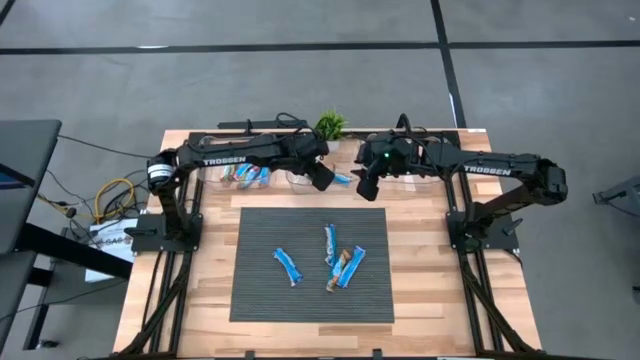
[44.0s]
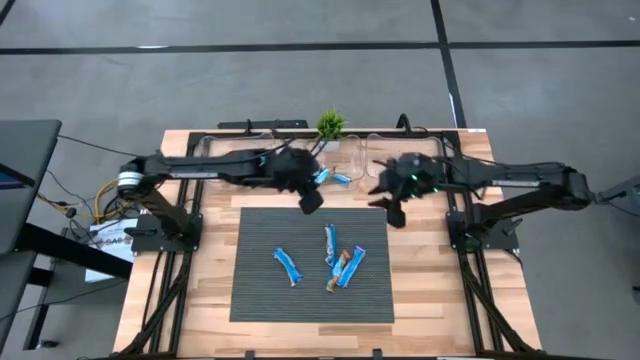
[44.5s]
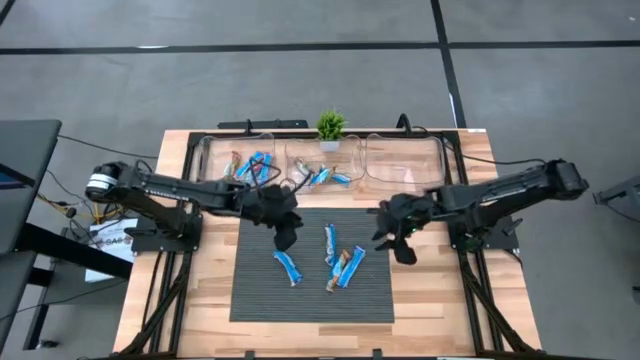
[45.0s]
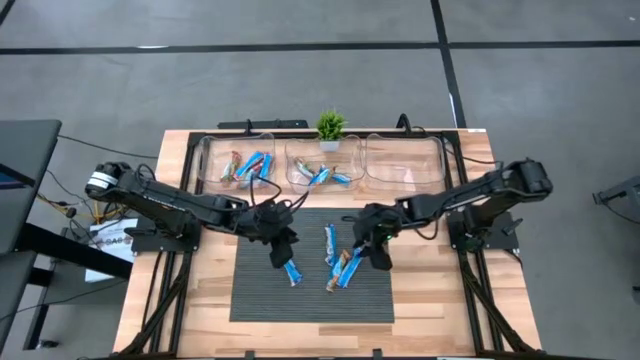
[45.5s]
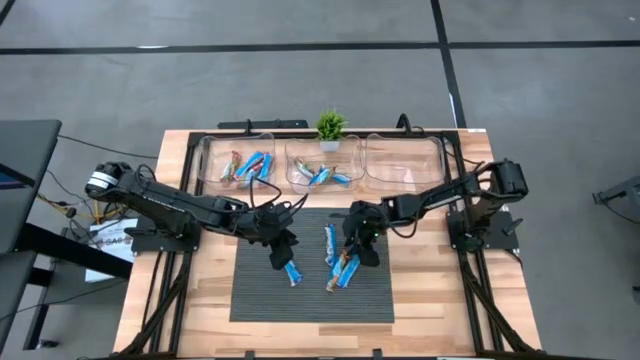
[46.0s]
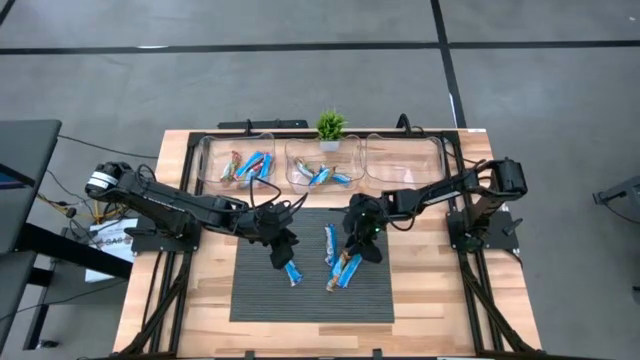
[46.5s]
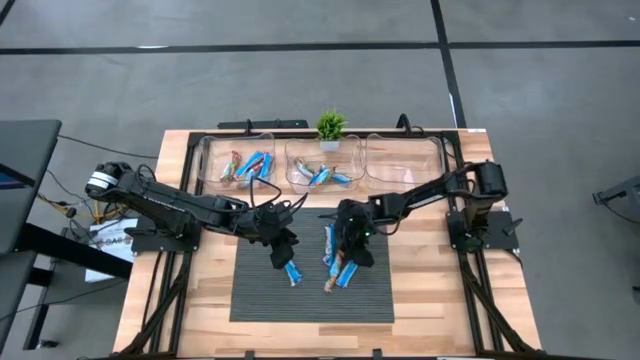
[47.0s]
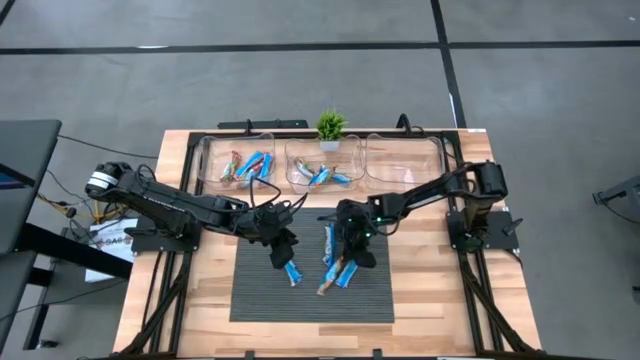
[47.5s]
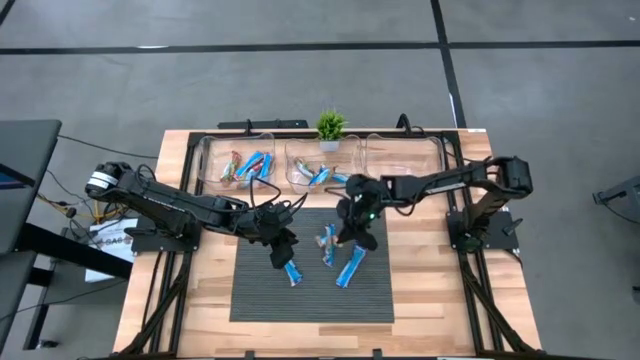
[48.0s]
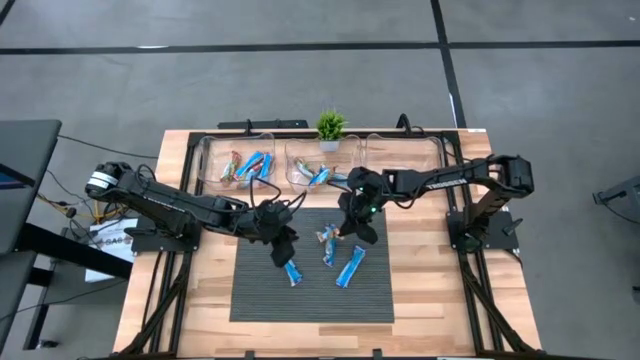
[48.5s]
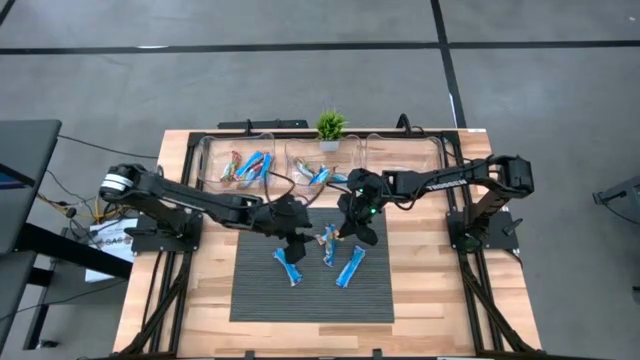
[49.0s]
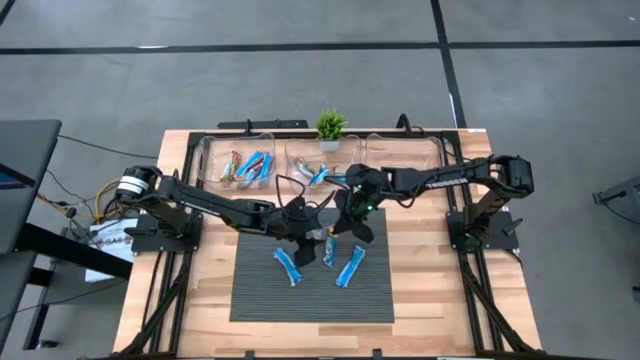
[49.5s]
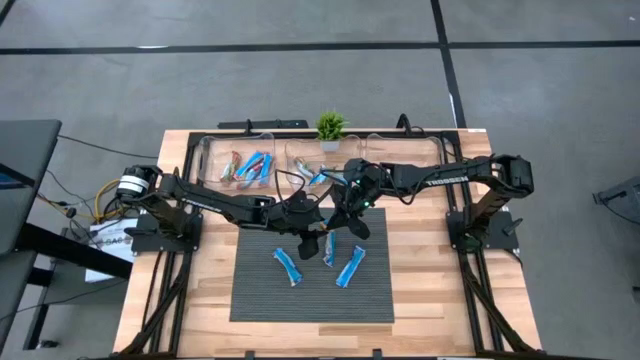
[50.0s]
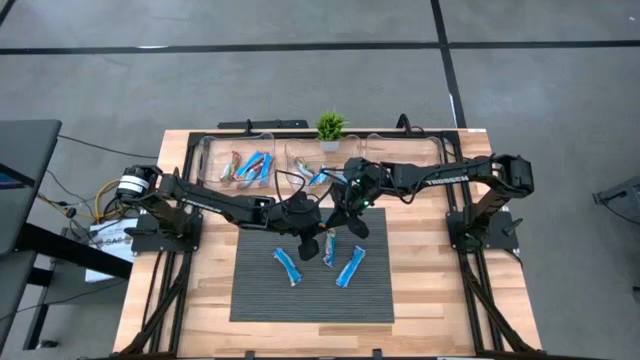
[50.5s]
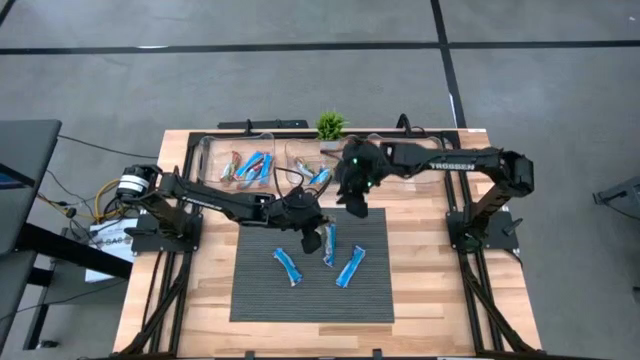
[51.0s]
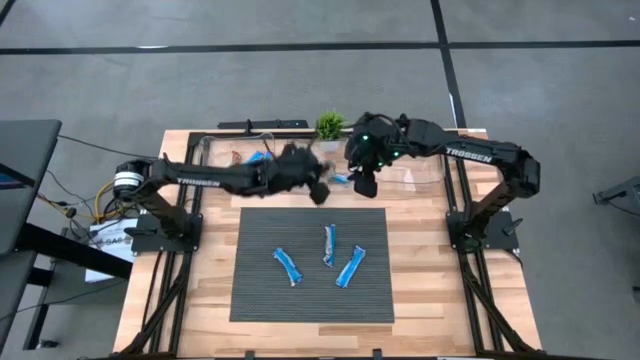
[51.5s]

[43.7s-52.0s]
Task: Pick and place Granola Bars by type
Put the green granola bar into the top center transparent bin

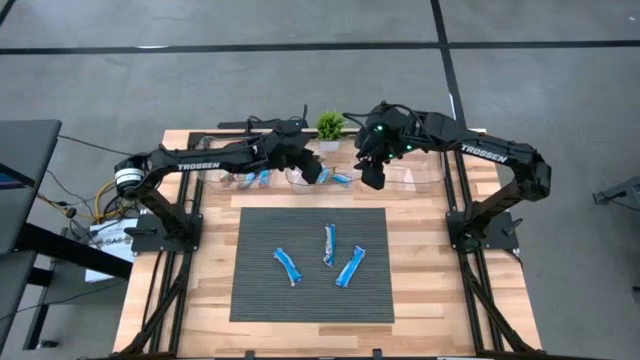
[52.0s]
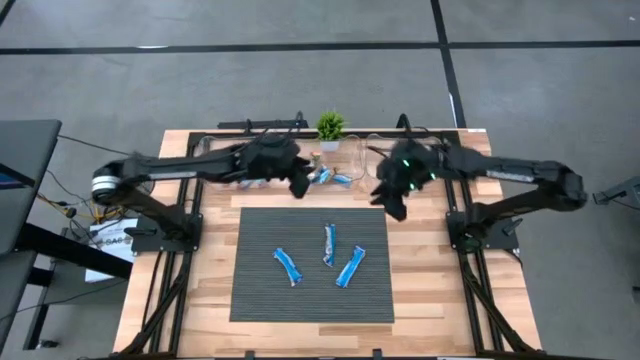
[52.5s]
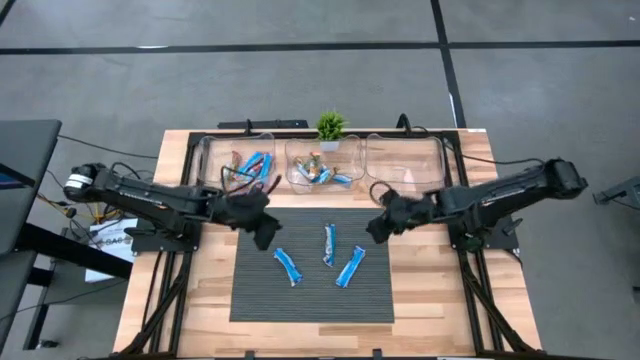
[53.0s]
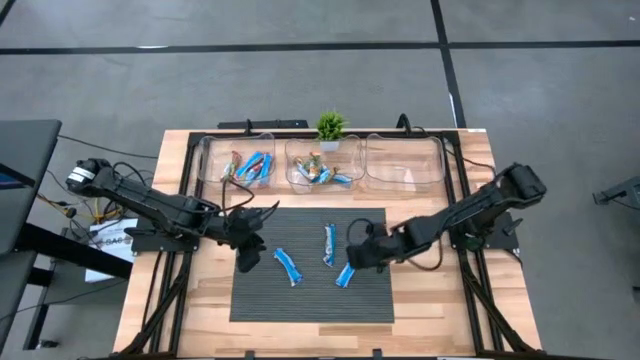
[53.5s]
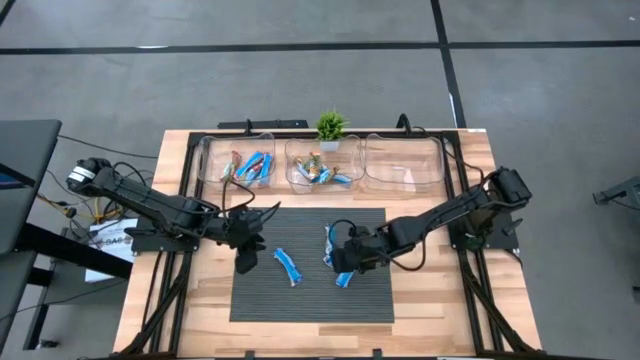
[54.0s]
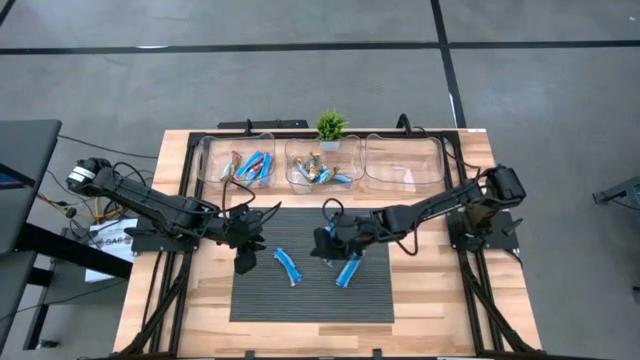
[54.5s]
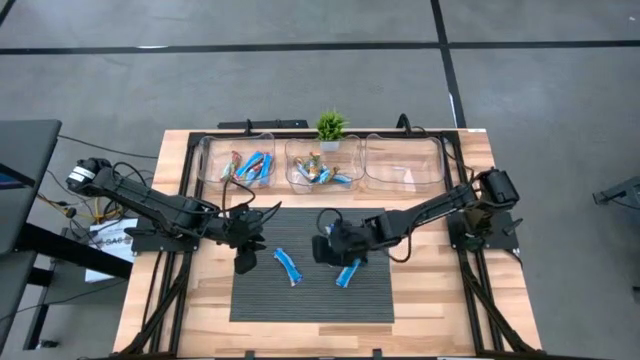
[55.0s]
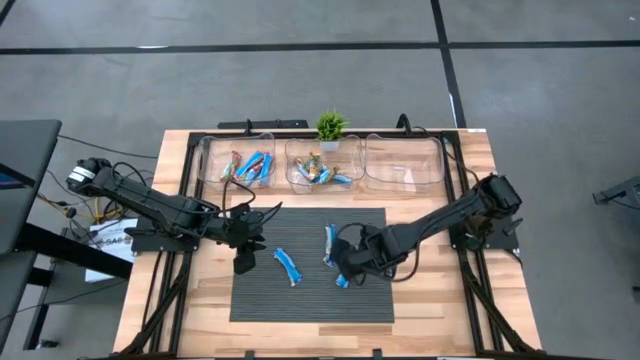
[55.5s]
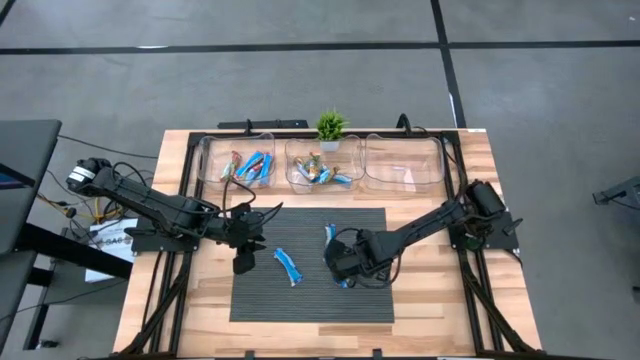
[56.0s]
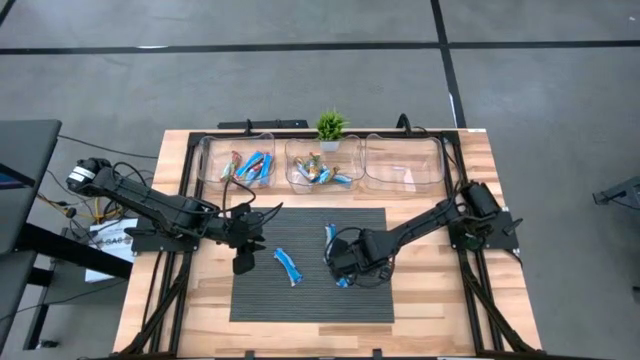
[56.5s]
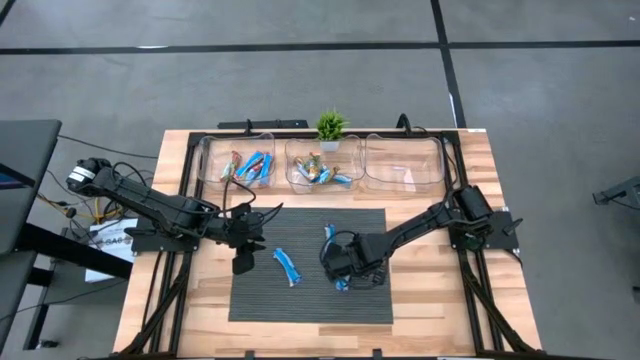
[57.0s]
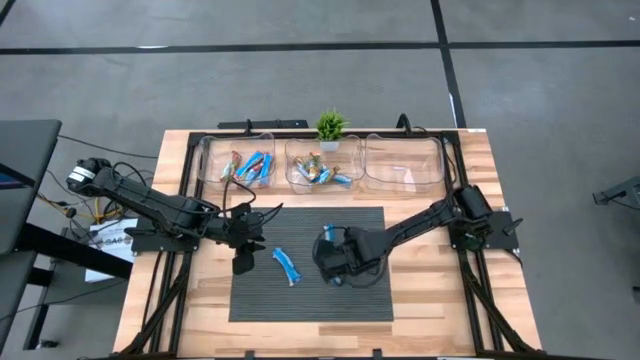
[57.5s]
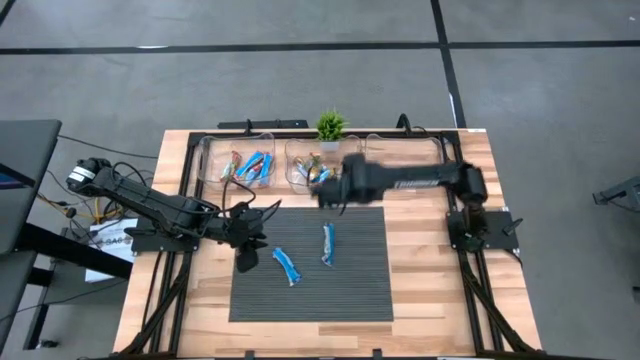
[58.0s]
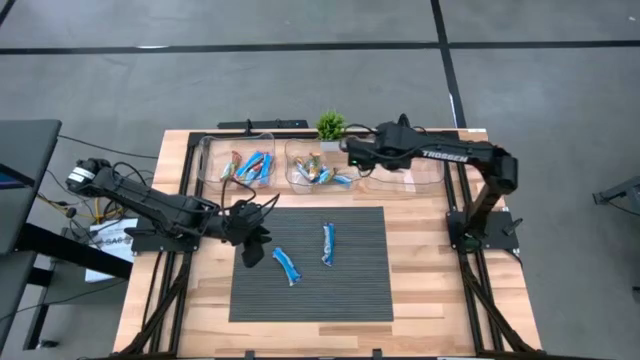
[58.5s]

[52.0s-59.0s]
Put the purple granola bar into the top right transparent bin

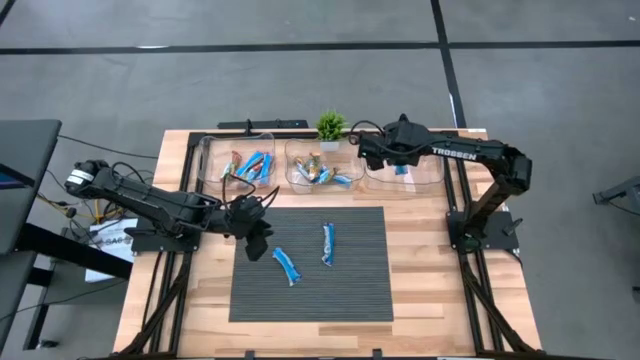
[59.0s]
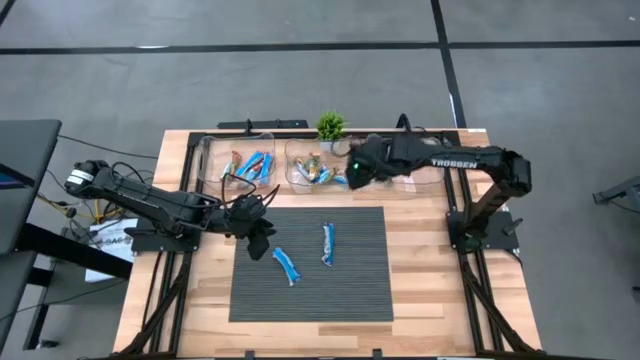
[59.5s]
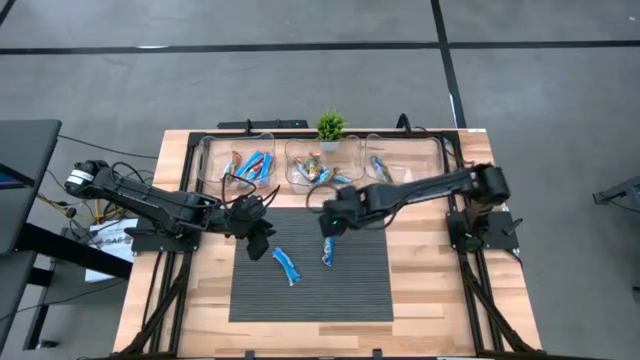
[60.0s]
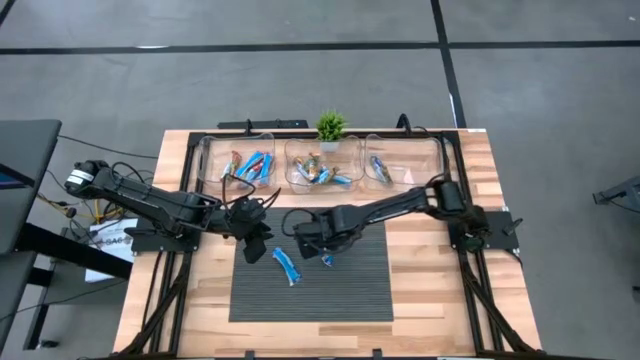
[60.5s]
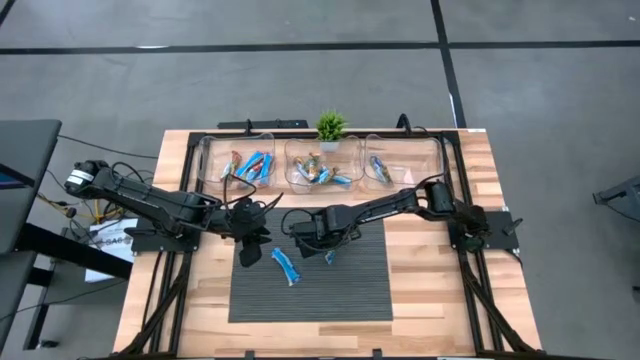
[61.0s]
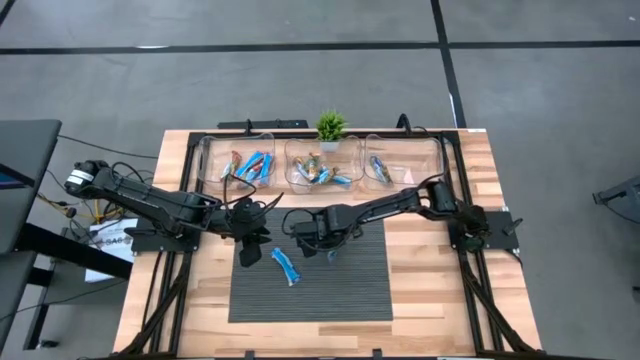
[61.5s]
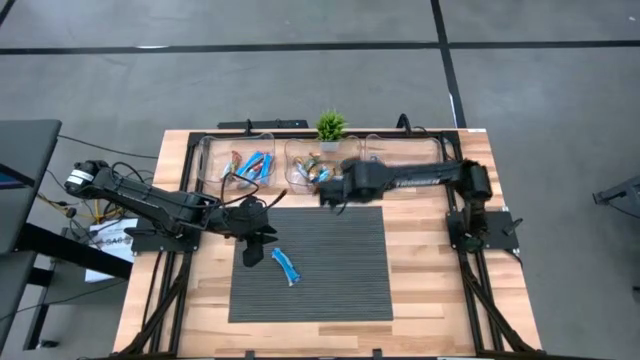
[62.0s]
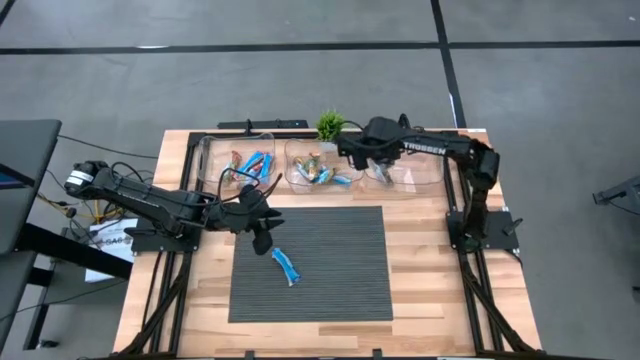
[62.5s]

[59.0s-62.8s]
Put the purple granola bar into the top right transparent bin

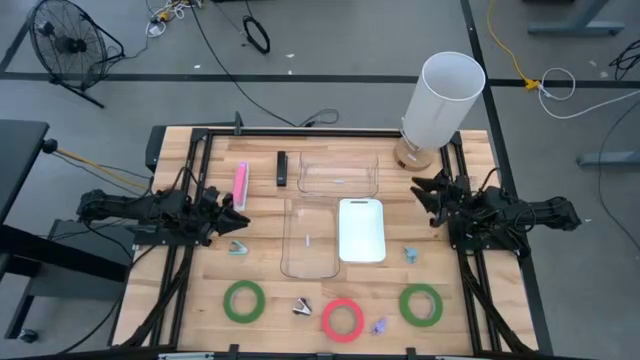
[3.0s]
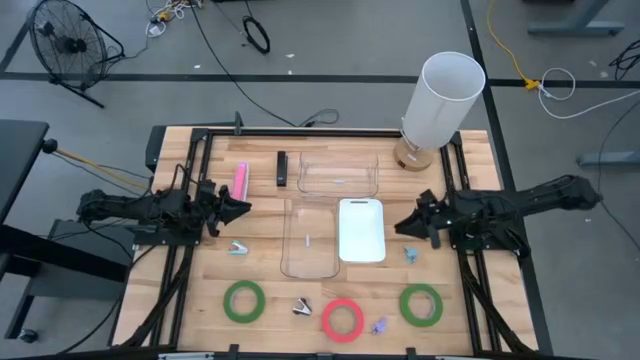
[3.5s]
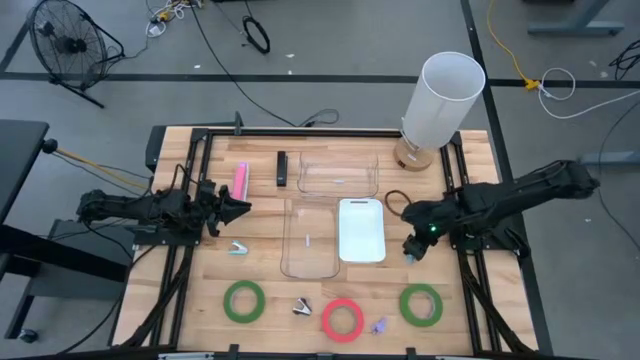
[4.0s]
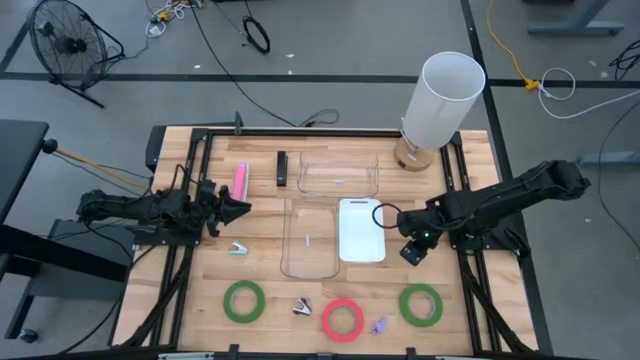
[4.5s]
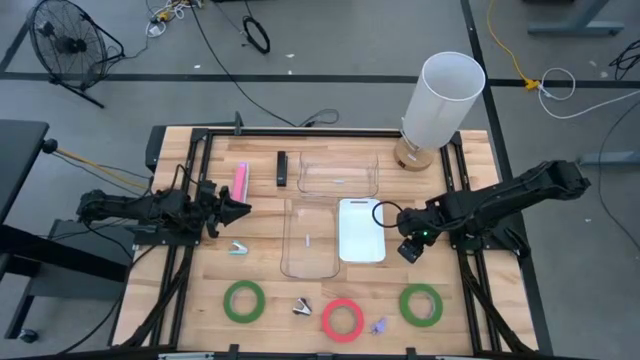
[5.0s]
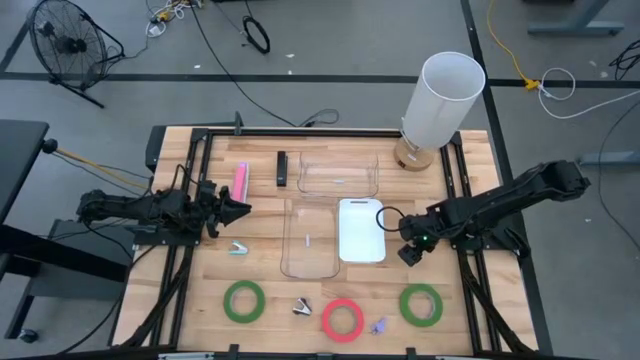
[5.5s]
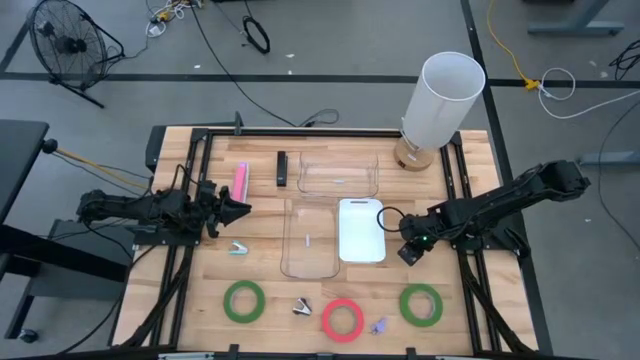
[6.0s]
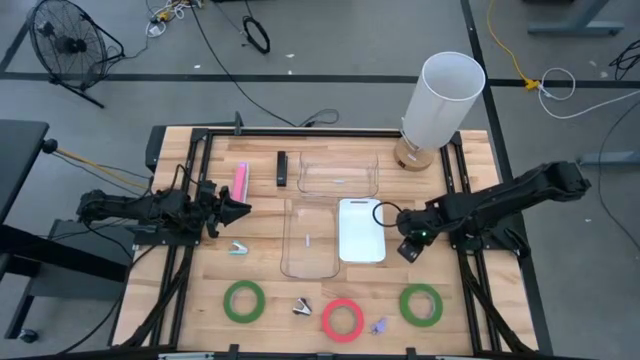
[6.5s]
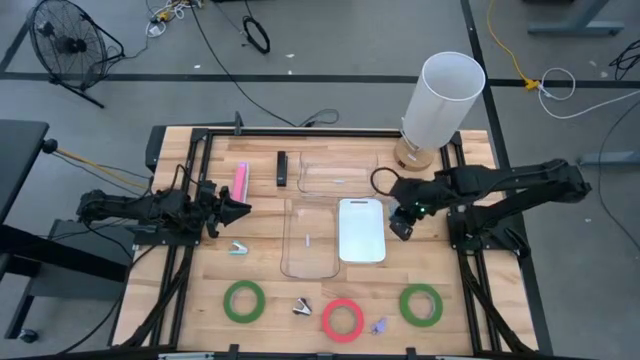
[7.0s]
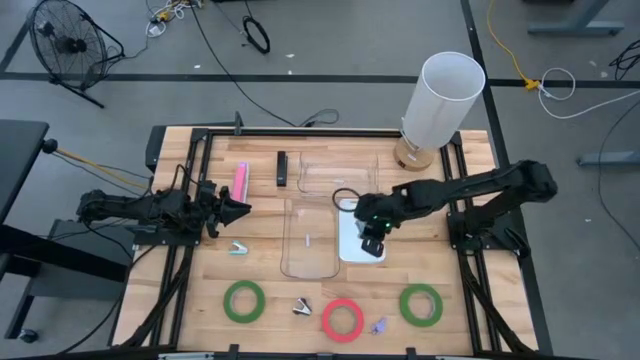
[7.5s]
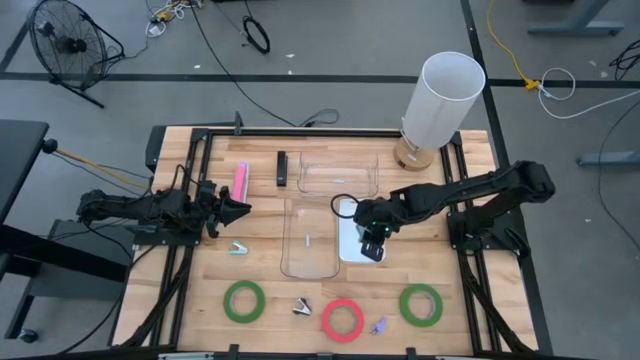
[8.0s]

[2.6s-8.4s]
Task: Pick and place Stapler, Stapler remover, tape
Put the light blue staple remover into the white bin
